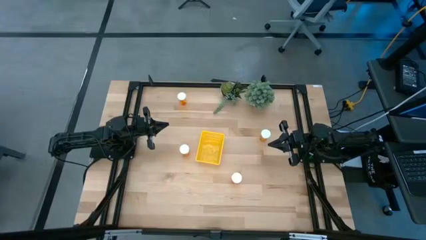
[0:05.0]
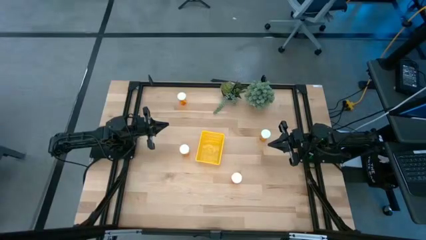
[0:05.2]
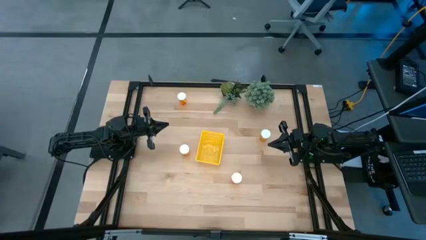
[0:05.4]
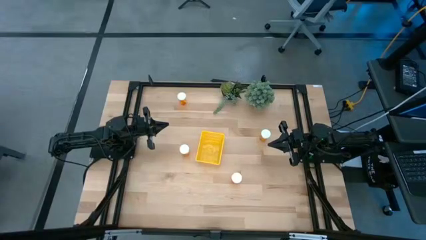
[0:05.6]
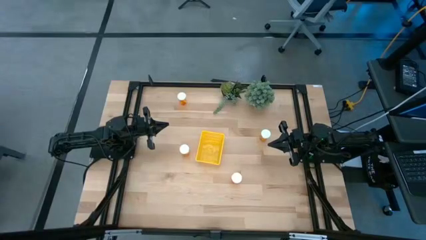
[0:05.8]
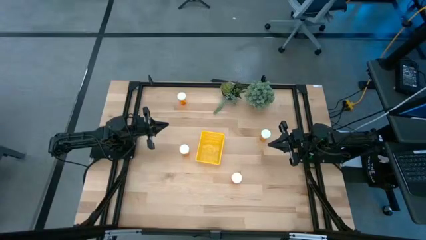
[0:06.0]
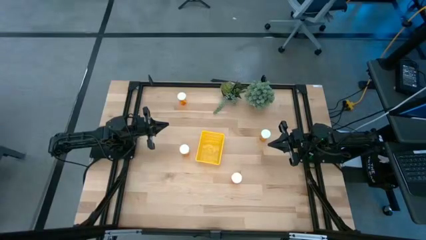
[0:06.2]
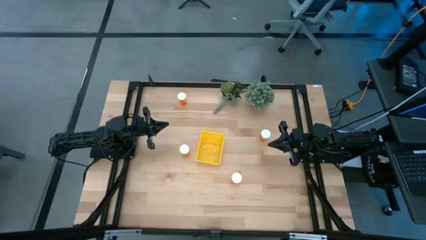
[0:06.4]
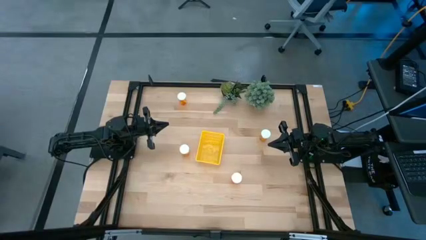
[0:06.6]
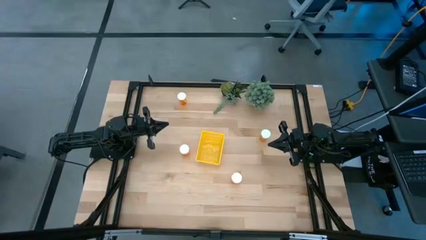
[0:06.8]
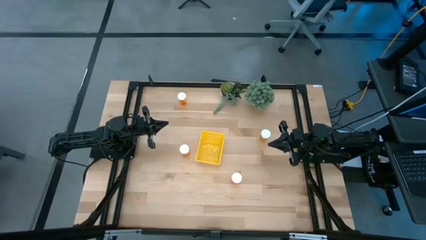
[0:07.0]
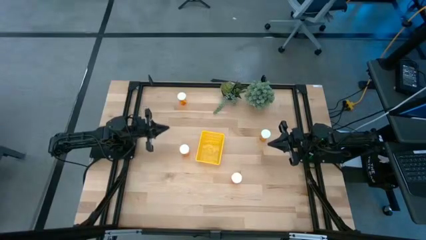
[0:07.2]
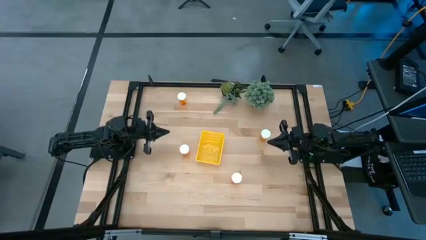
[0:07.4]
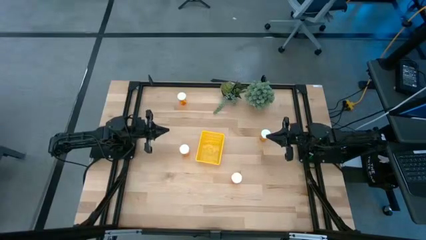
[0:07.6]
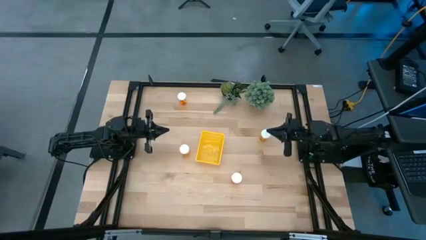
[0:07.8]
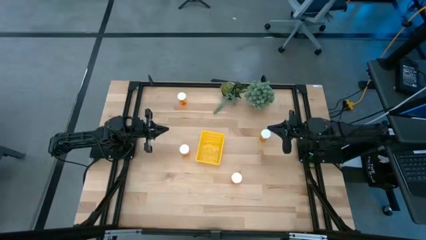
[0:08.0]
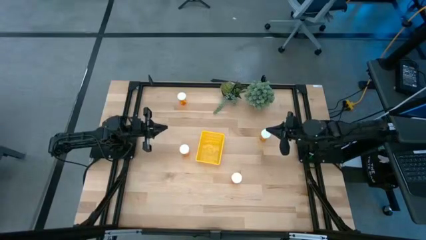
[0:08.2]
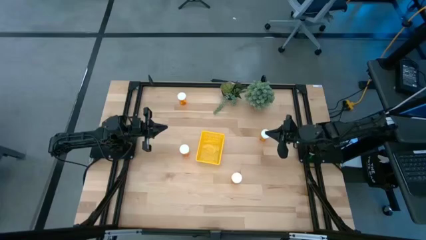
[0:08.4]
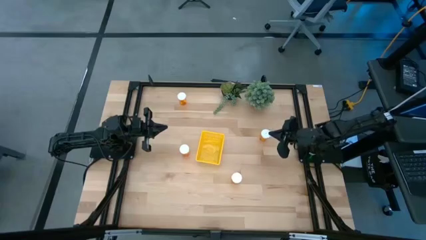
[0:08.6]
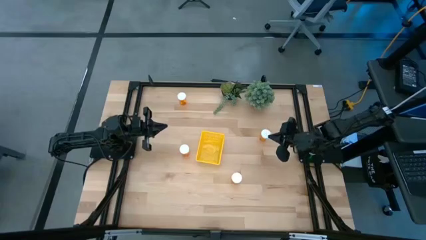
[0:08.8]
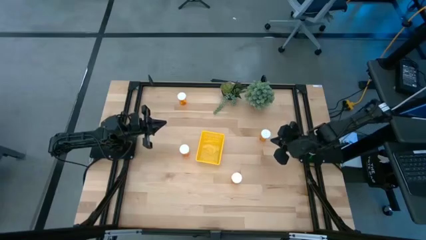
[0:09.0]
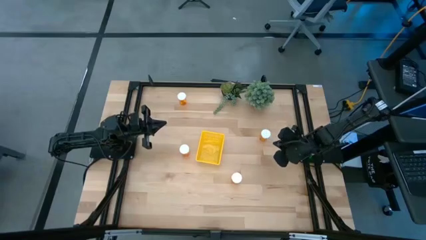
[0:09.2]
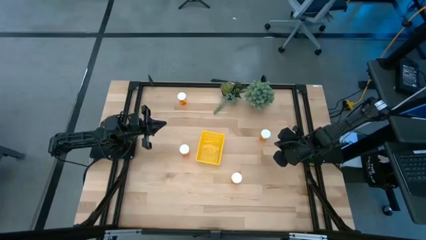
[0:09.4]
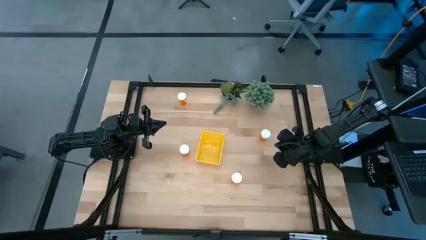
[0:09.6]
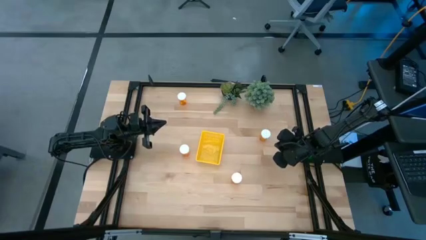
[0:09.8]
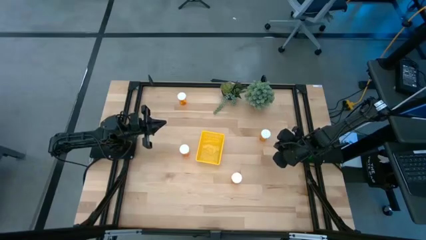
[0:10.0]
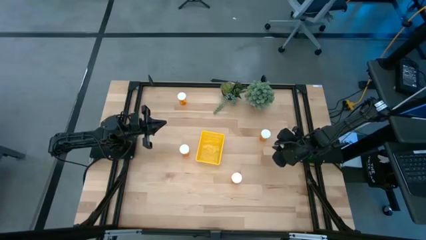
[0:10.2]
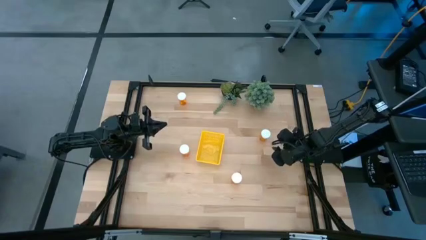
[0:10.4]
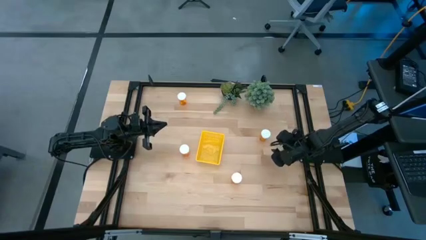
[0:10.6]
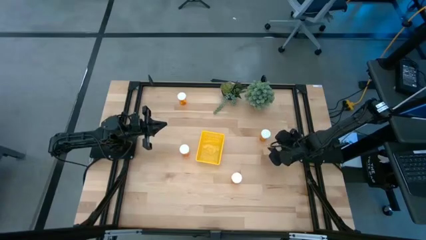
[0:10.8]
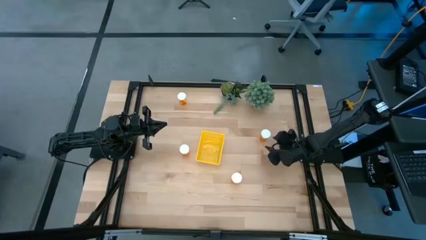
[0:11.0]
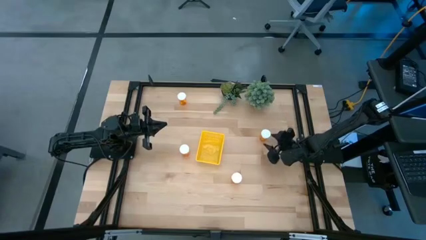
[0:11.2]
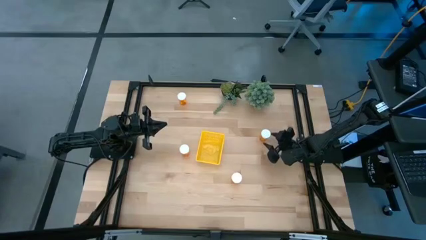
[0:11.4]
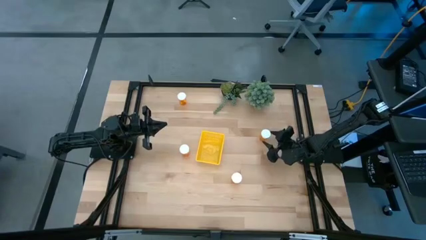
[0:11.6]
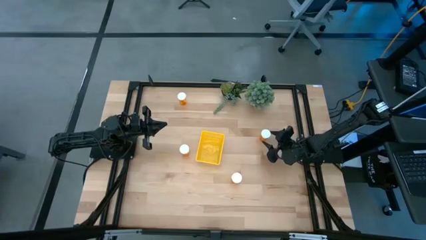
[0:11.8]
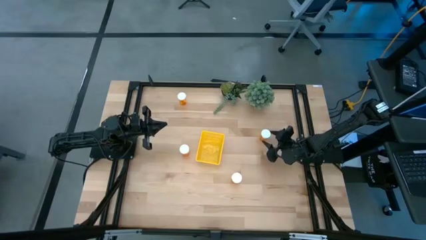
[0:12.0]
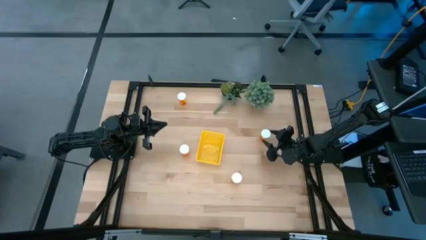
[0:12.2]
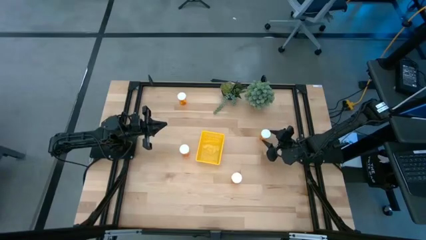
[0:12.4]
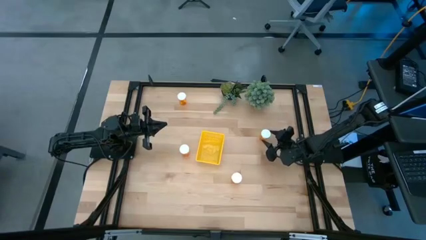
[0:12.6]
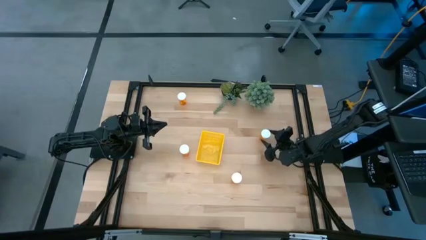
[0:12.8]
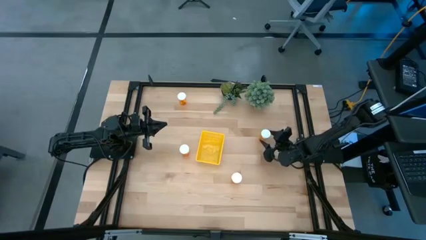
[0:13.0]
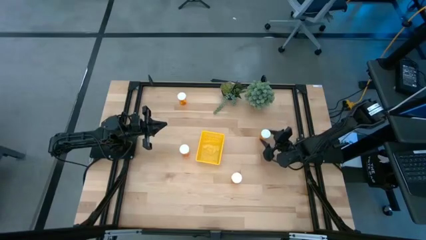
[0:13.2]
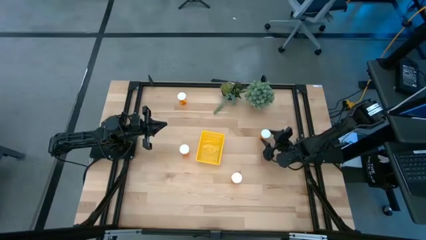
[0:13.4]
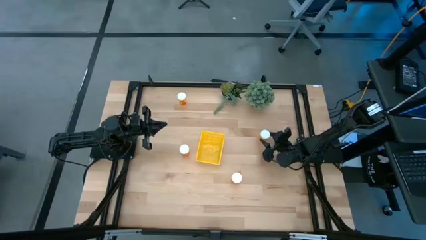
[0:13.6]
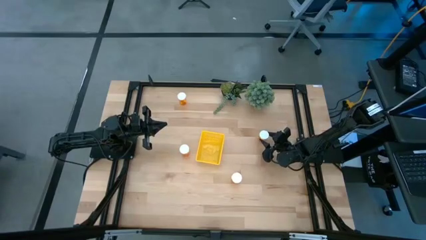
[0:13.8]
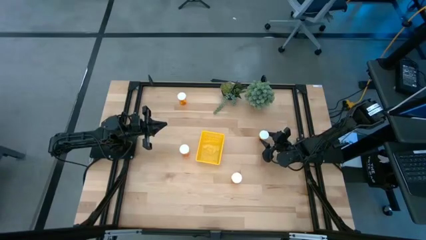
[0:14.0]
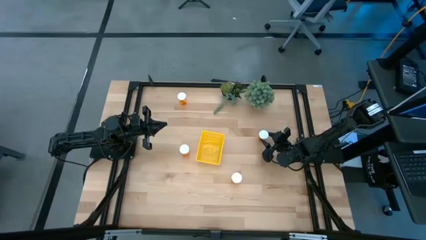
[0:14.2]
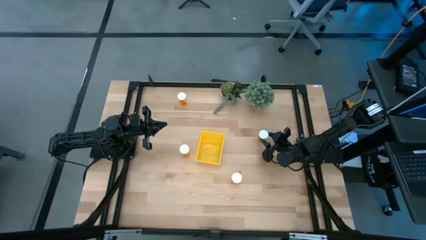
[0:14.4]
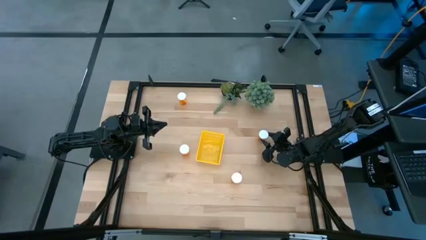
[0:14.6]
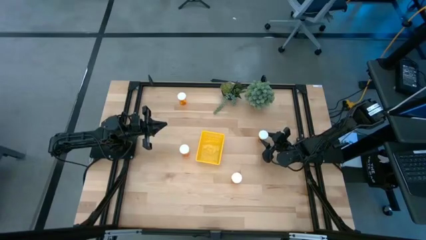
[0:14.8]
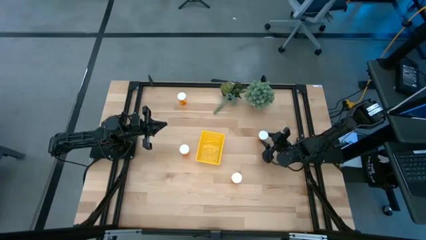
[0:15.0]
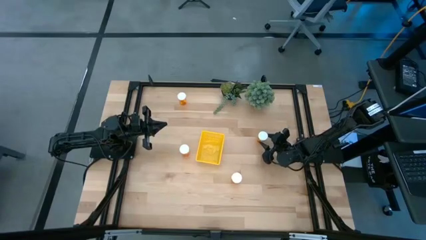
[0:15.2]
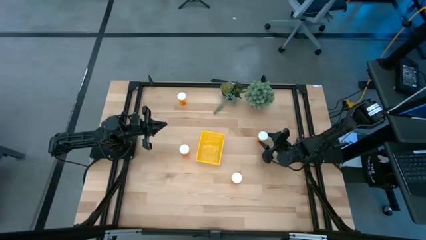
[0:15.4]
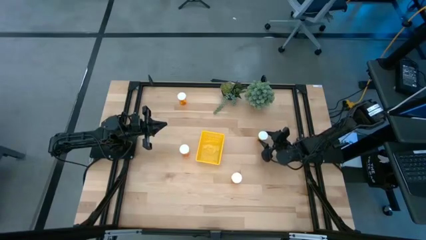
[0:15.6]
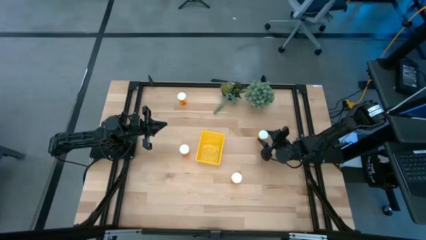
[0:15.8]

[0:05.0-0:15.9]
Task: Pick and place pill bottles into a basket
Put the orange pill bottle into the yellow bin

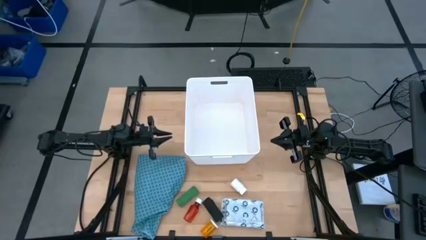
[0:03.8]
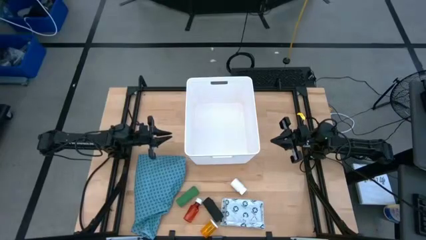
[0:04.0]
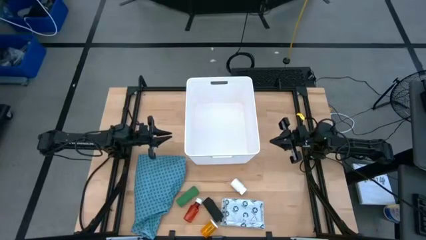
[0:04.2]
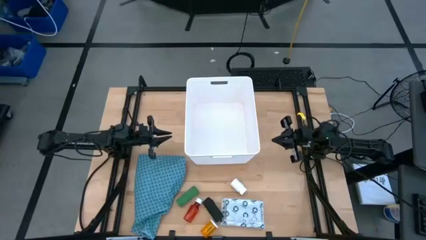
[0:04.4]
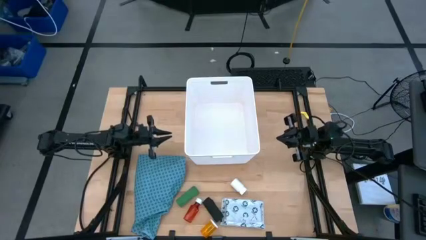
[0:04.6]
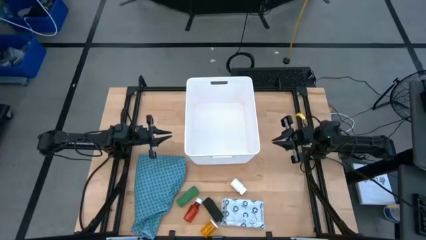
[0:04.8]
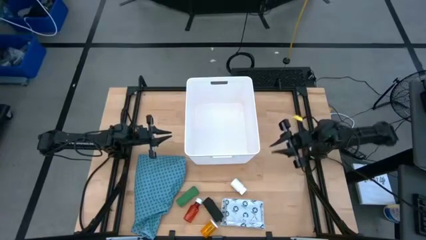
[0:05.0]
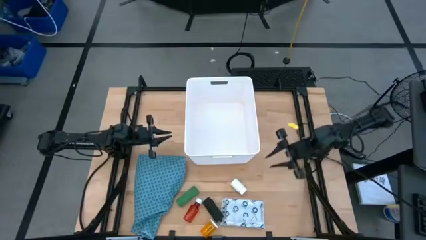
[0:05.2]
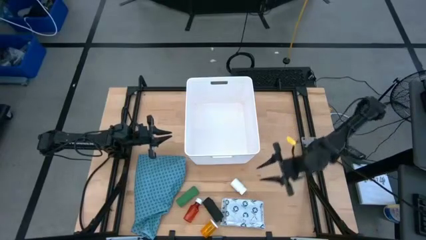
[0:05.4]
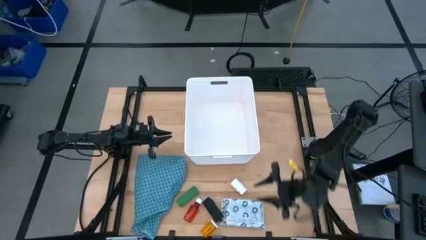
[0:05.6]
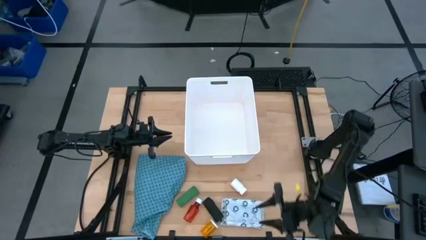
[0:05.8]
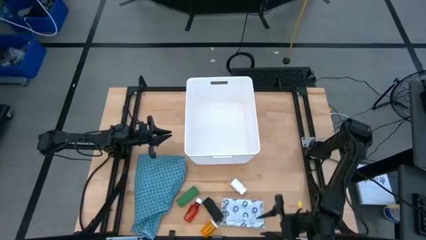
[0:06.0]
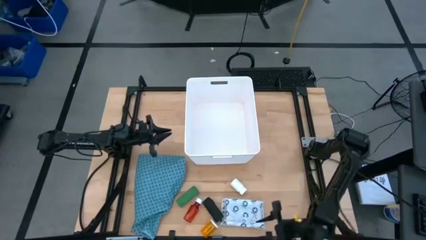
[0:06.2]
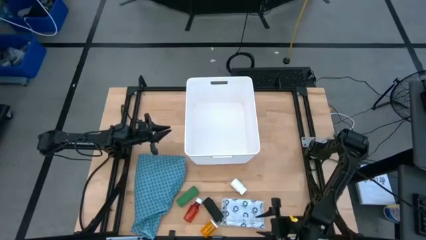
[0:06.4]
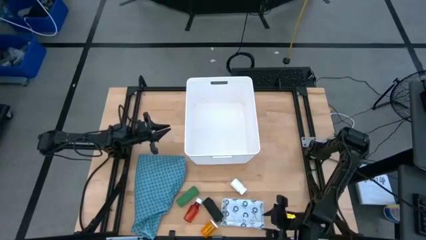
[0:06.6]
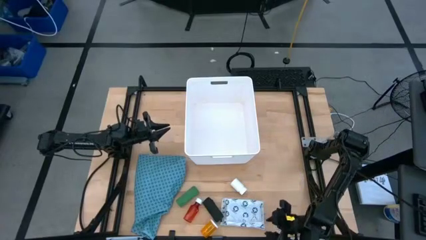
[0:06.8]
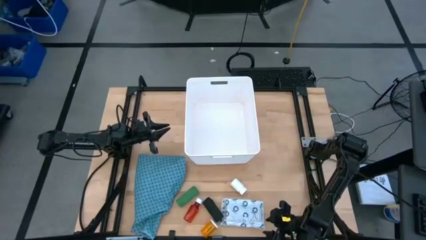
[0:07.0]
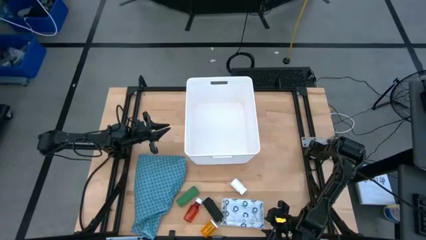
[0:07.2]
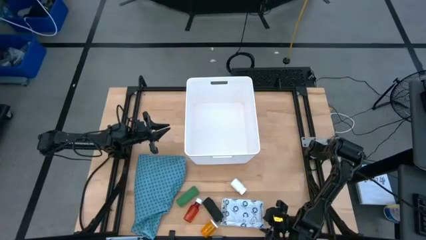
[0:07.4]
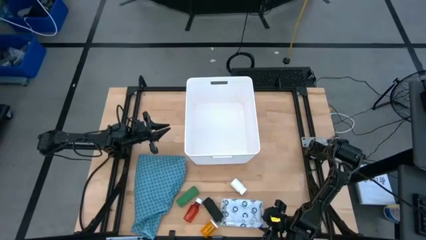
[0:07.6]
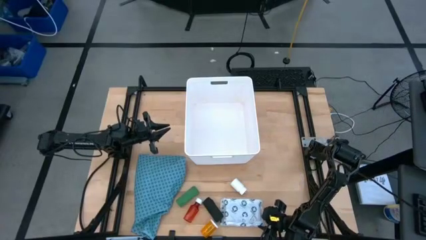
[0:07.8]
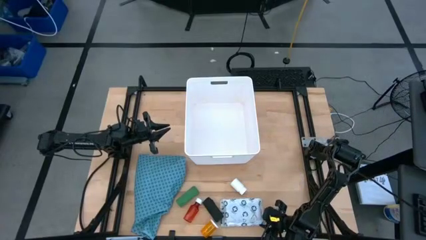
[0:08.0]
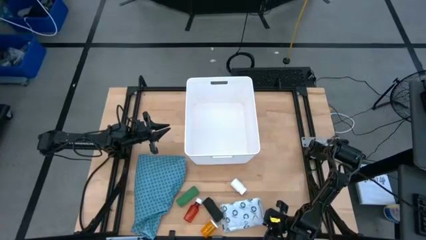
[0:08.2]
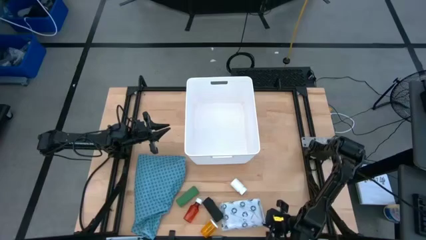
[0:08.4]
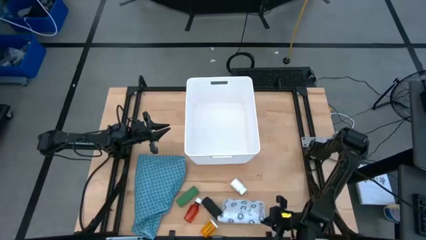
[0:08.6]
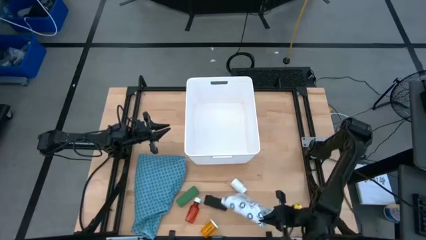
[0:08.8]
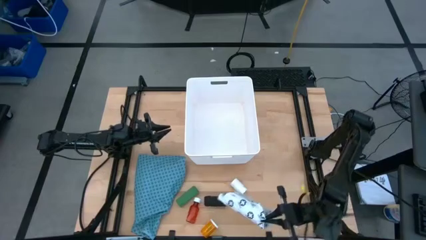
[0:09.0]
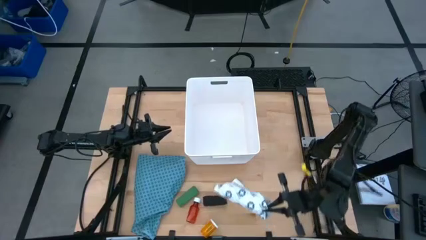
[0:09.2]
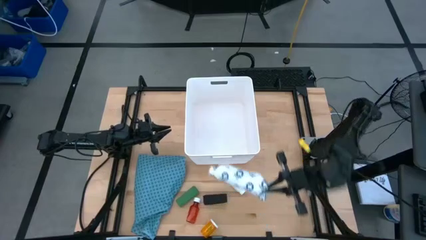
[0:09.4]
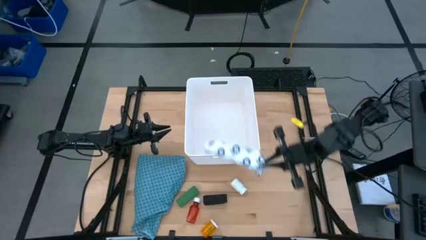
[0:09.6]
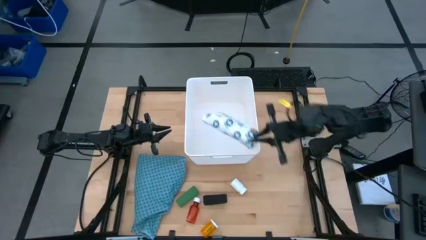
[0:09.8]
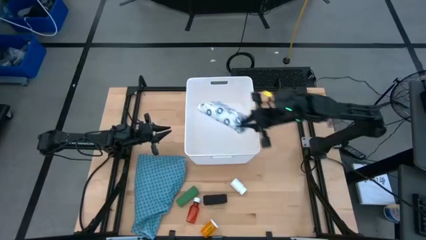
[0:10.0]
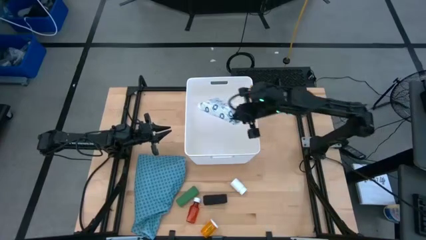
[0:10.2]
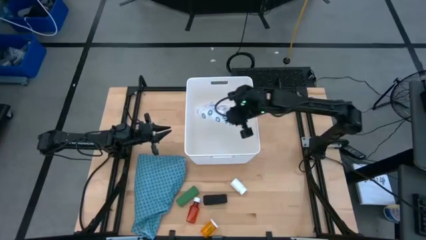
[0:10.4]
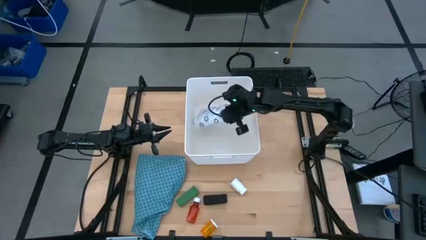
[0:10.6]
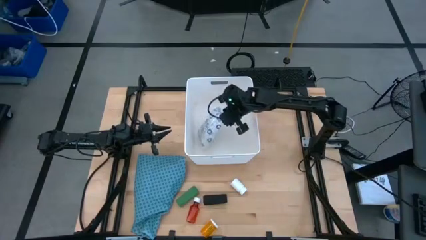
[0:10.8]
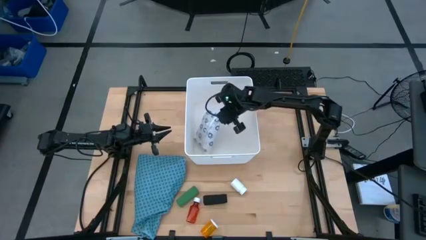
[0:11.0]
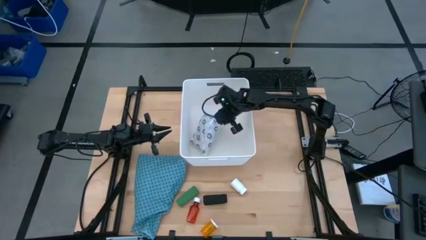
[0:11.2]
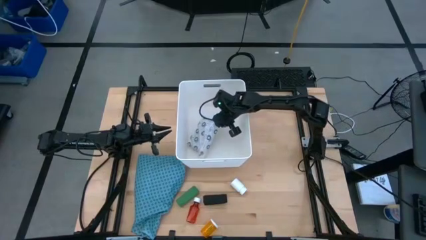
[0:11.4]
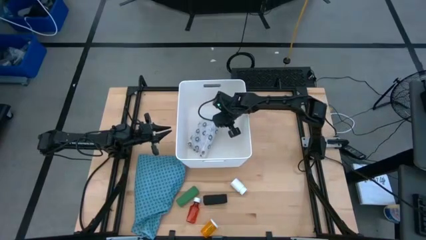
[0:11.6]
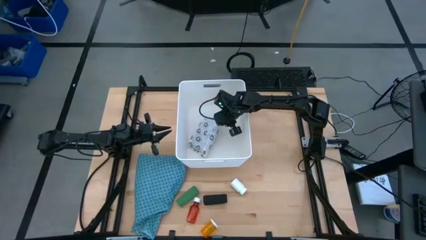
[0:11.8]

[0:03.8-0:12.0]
Task: Pick & place medical supplies in basket/bin
Put the white mailer bag into the white bin
